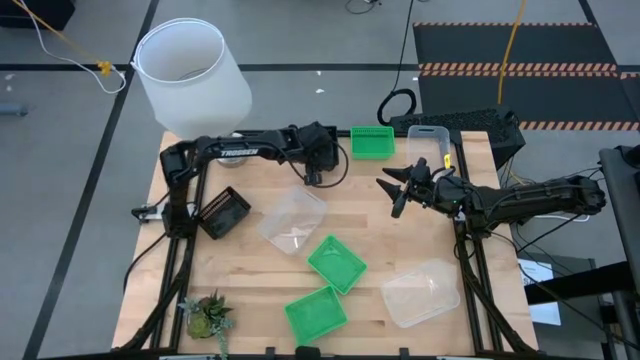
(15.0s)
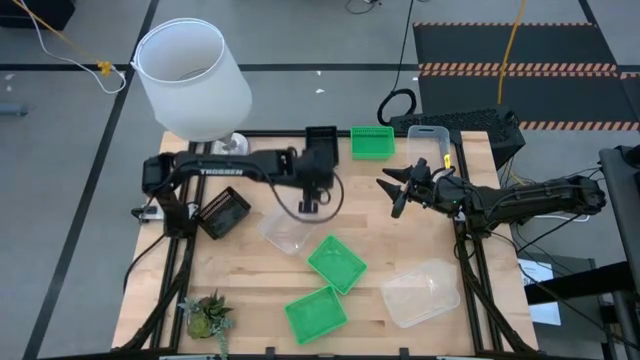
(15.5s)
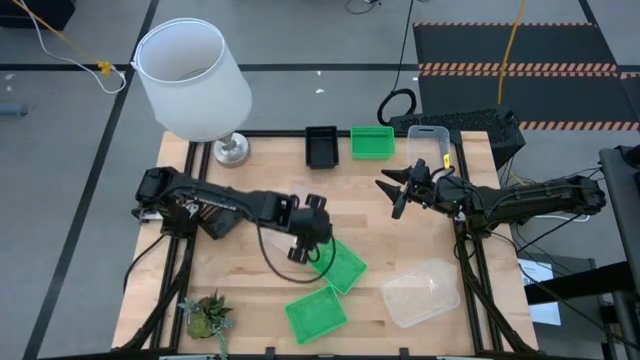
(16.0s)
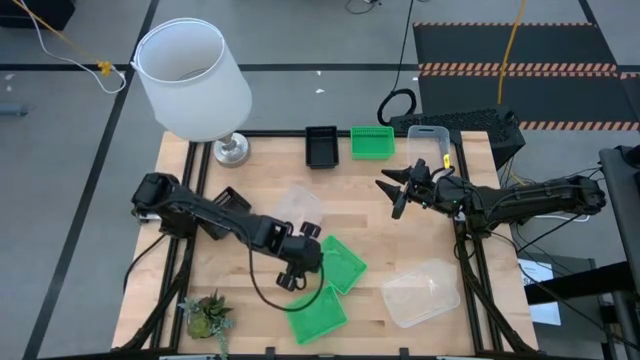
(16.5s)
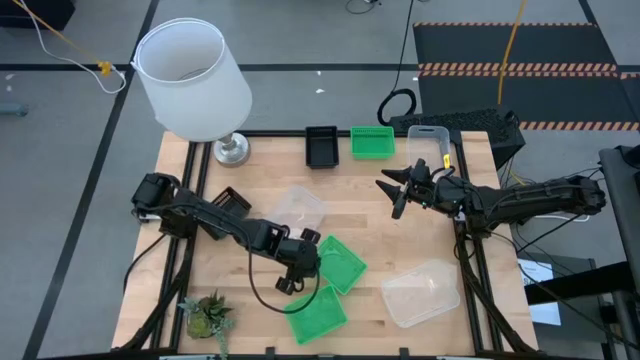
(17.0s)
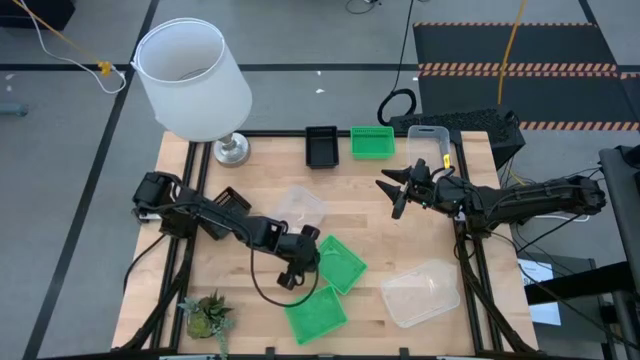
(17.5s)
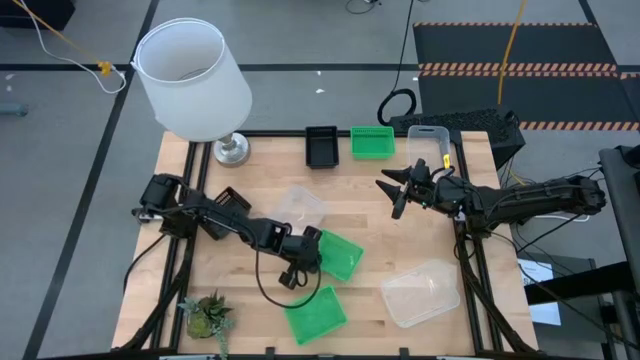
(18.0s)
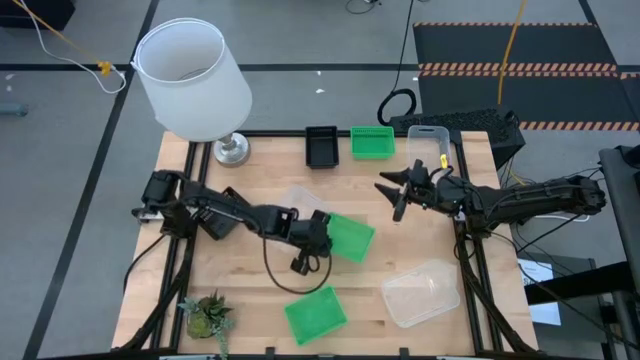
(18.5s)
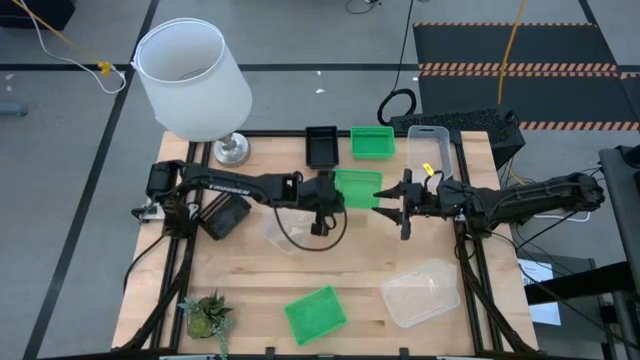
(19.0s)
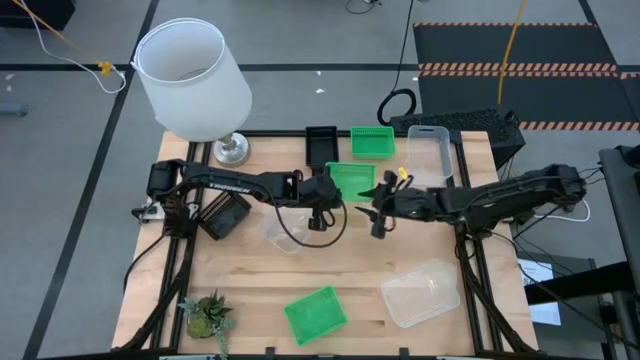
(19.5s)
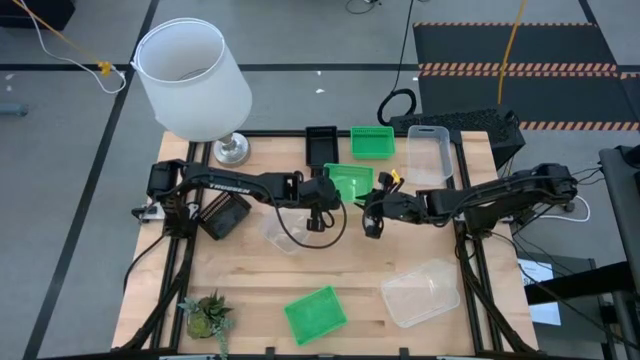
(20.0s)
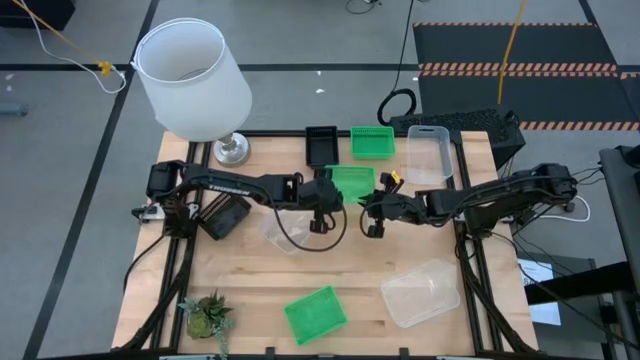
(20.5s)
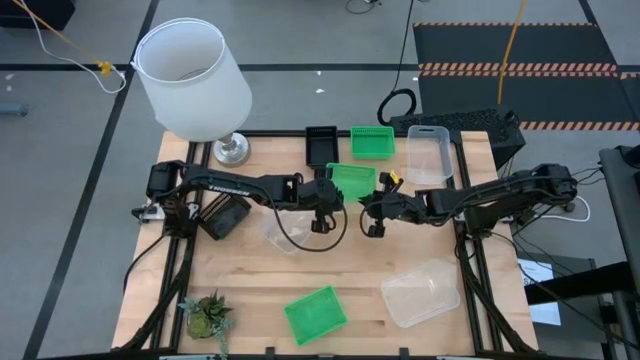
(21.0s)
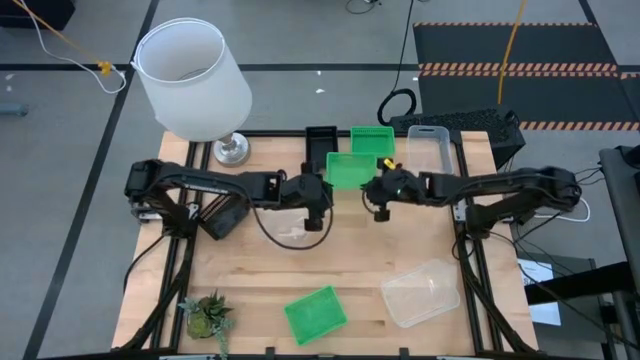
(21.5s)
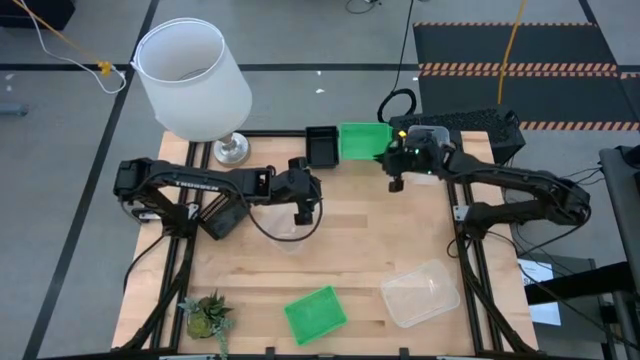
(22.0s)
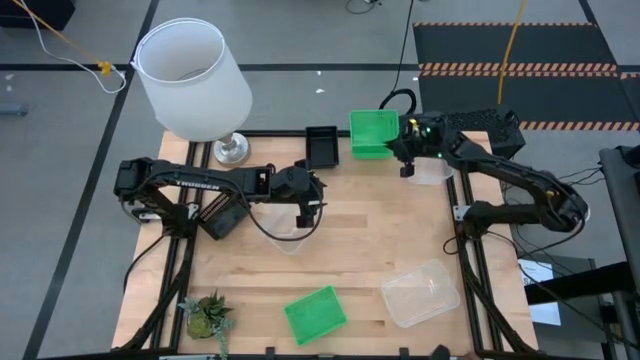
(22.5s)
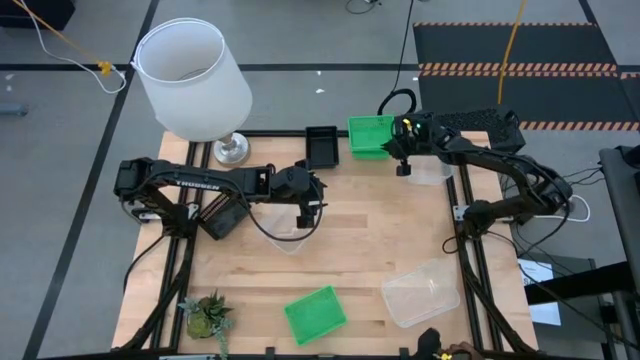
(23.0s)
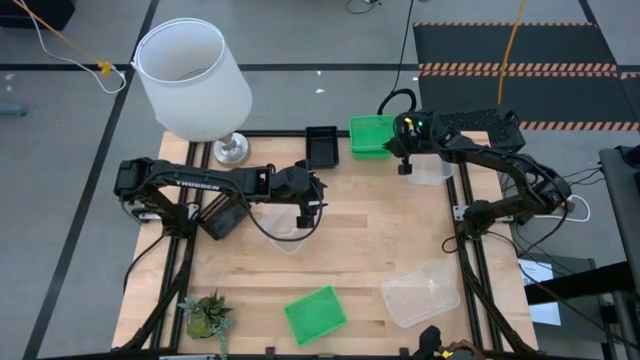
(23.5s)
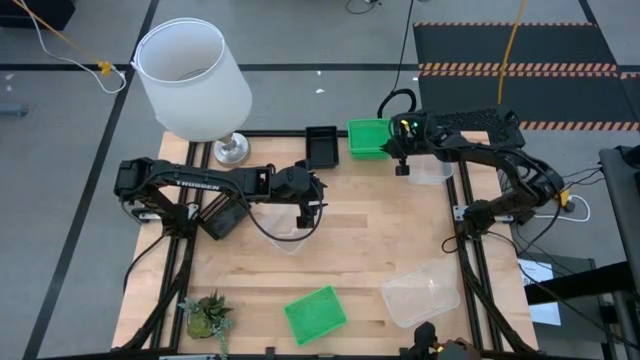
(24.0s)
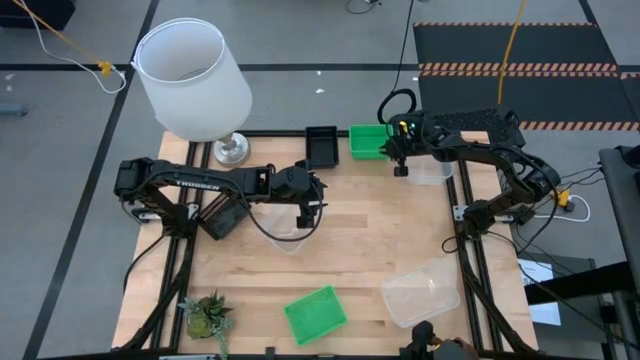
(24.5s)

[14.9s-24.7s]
Stack the middle green bin on top of the top green bin

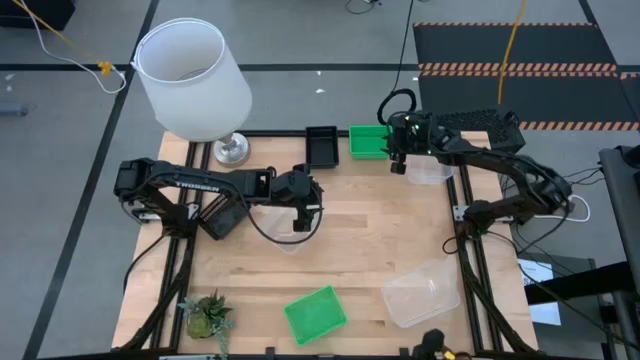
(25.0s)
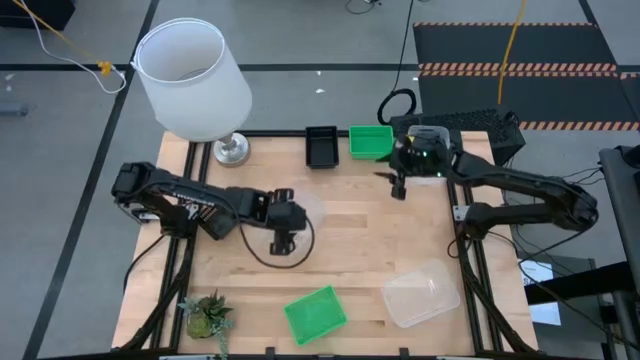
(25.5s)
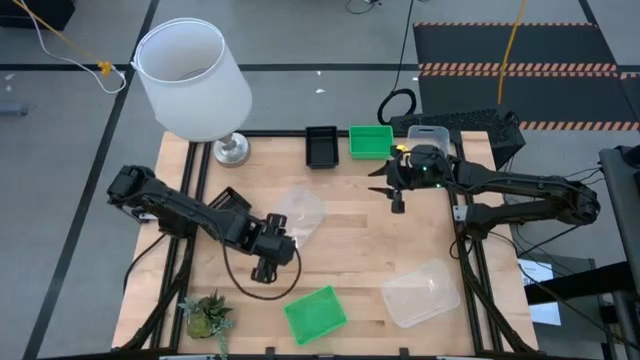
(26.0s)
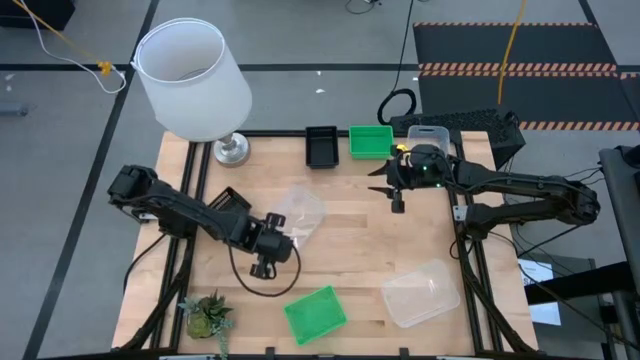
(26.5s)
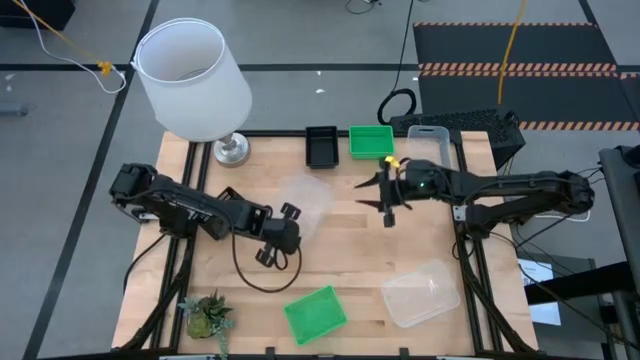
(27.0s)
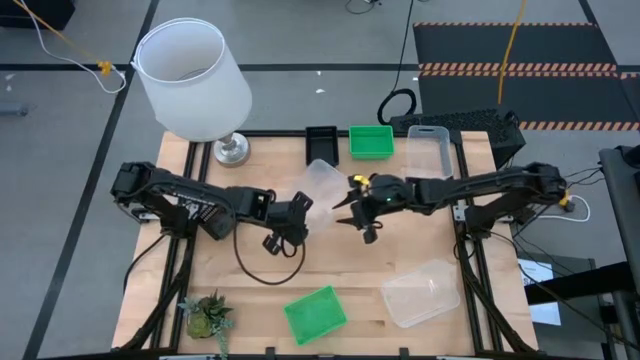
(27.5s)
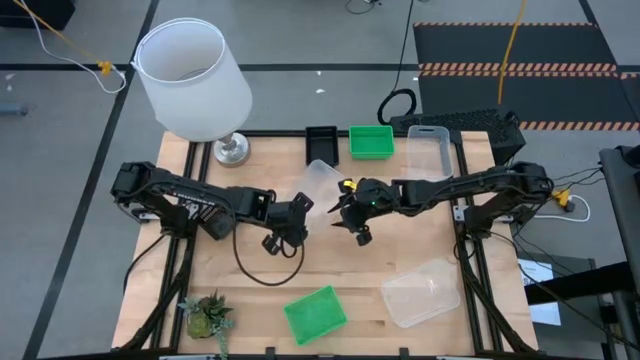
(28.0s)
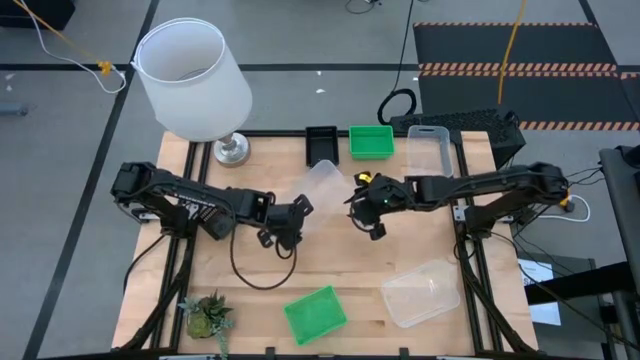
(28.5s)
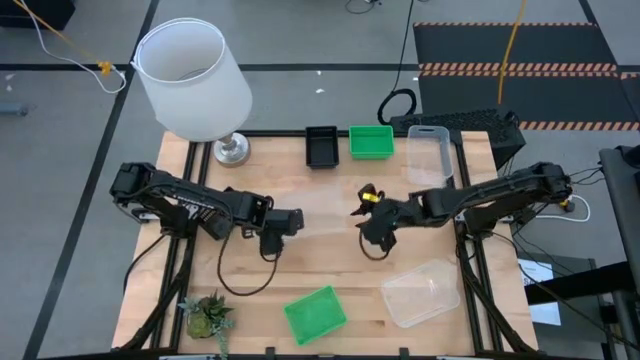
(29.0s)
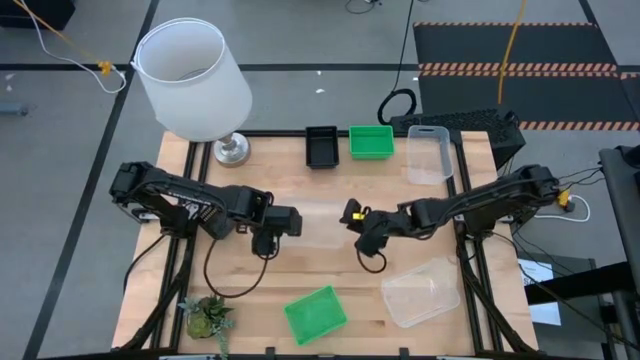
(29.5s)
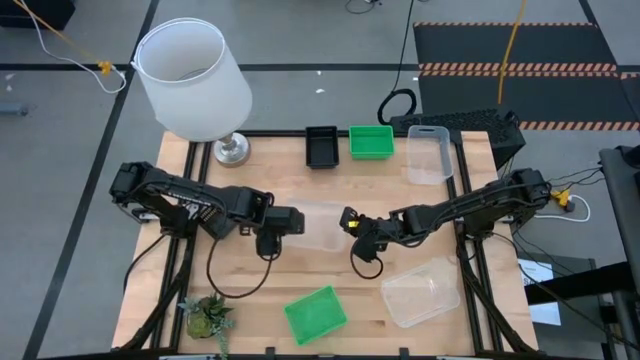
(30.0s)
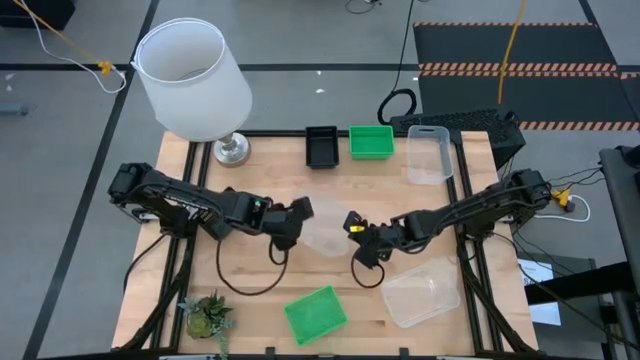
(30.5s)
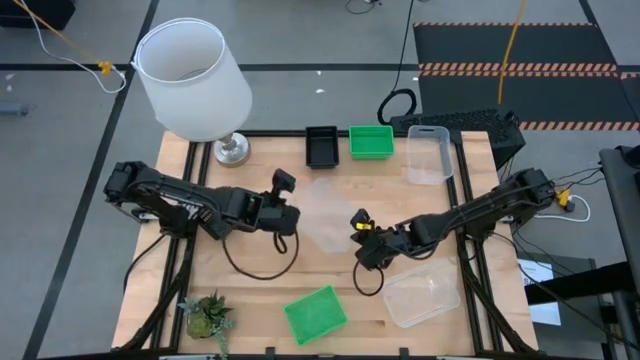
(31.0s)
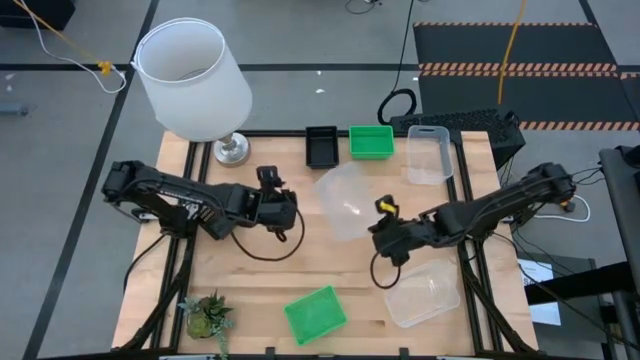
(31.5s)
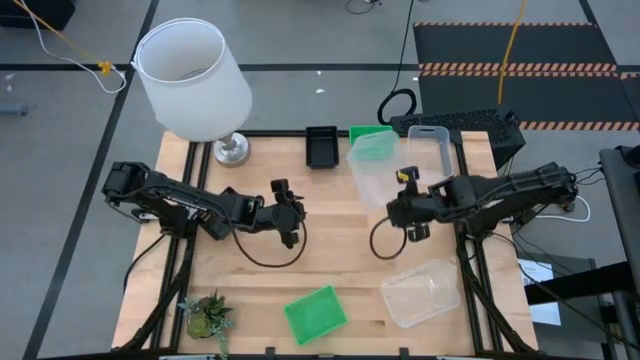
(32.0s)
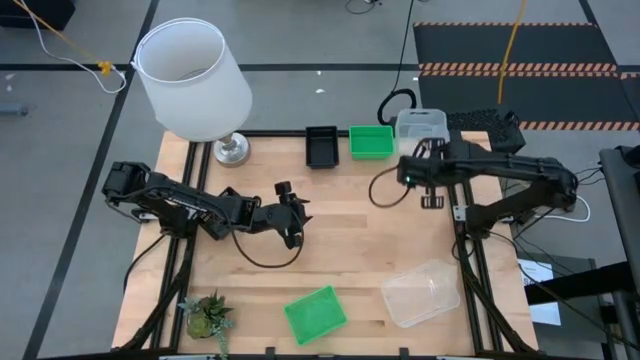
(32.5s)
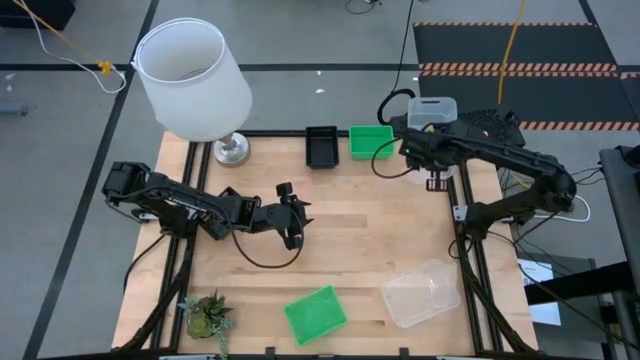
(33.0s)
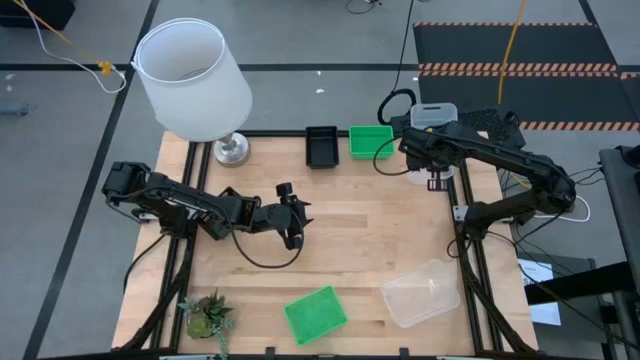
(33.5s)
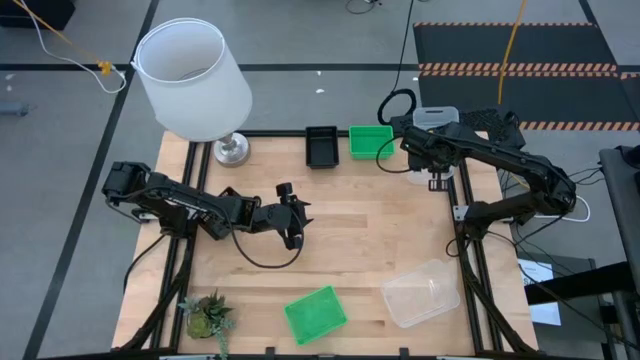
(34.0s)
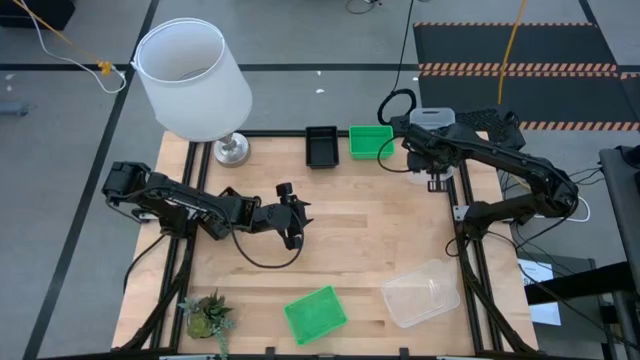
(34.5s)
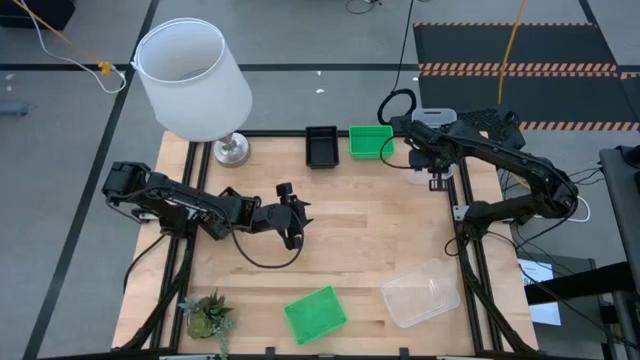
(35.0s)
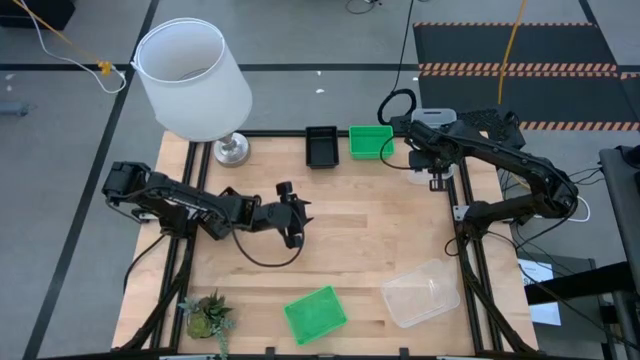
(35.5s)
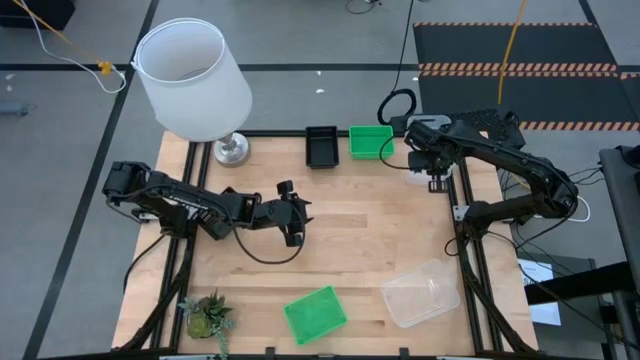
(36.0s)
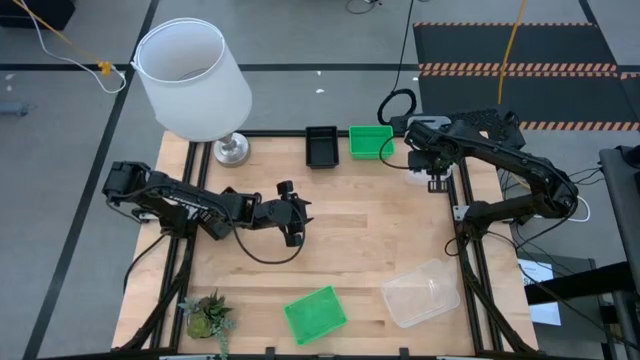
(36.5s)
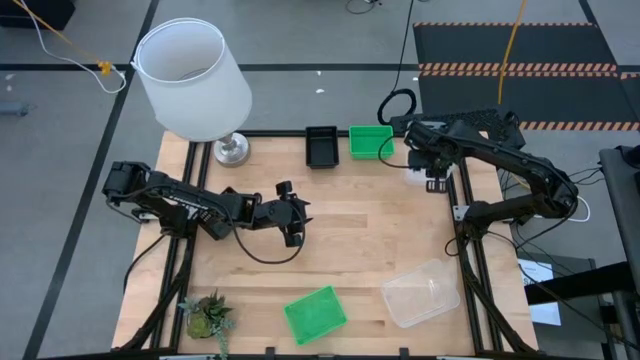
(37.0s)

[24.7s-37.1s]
Stack the middle transparent bin on top of the top right transparent bin
